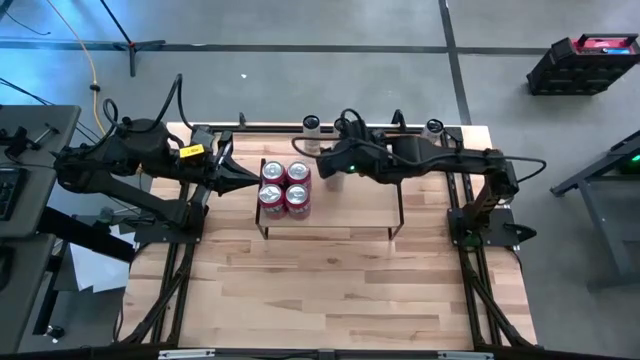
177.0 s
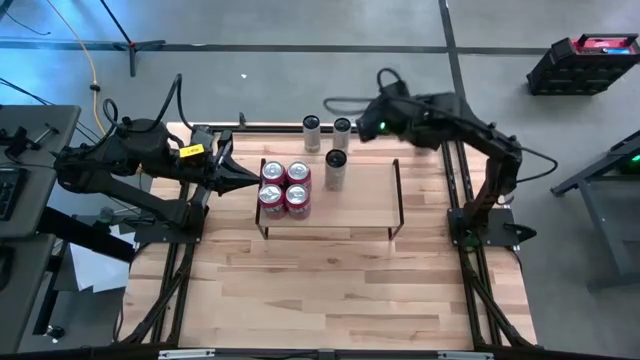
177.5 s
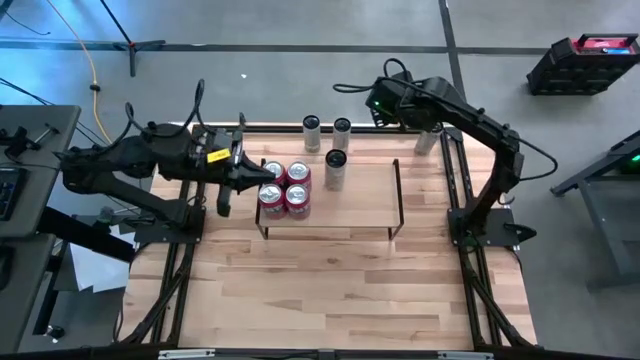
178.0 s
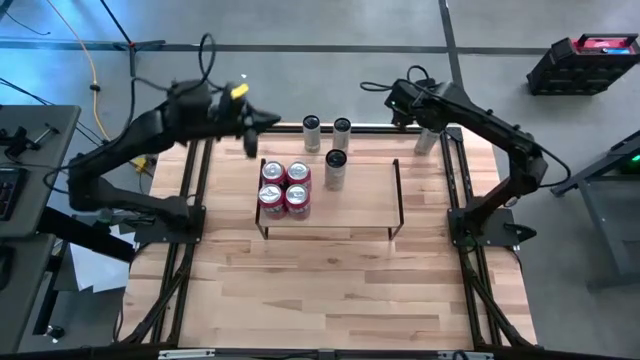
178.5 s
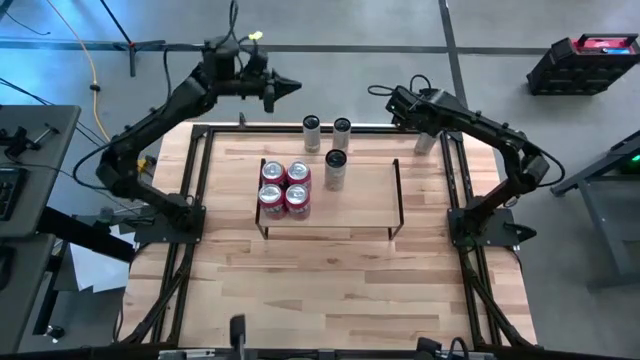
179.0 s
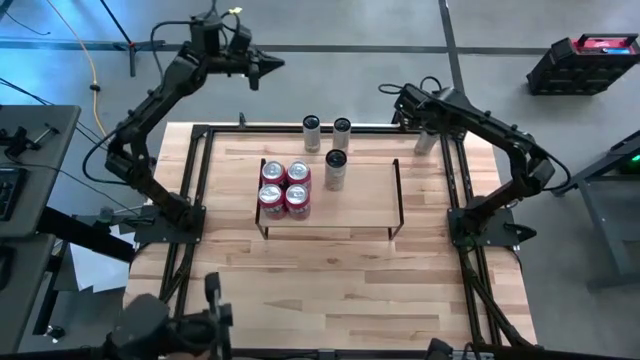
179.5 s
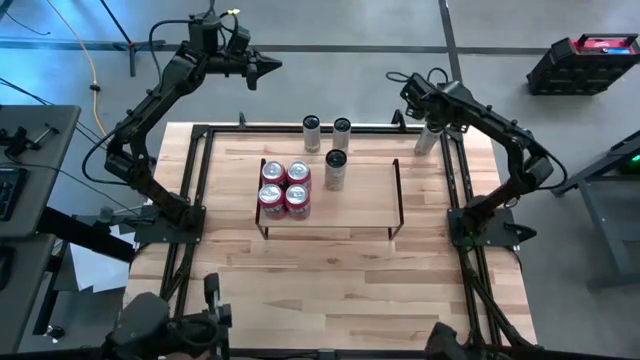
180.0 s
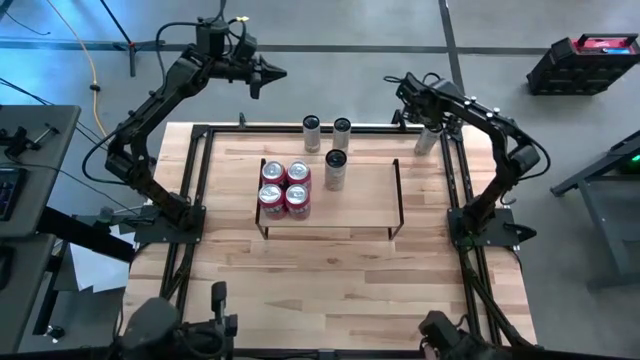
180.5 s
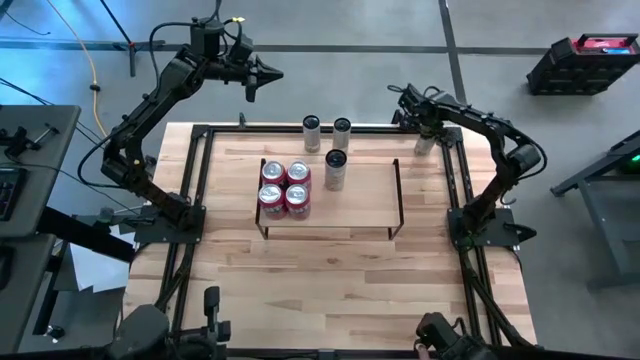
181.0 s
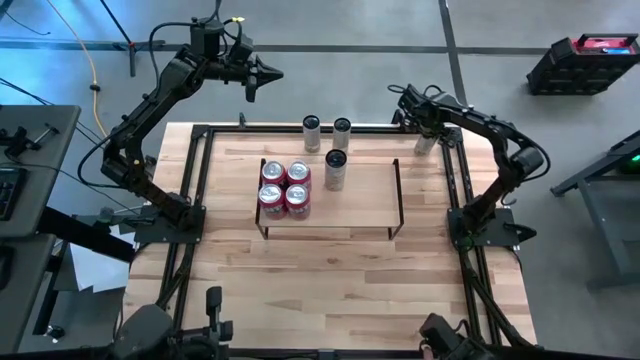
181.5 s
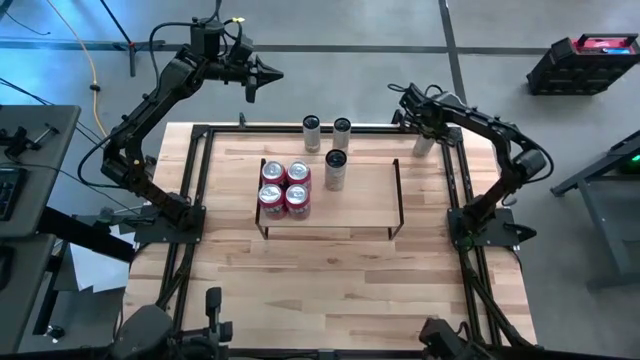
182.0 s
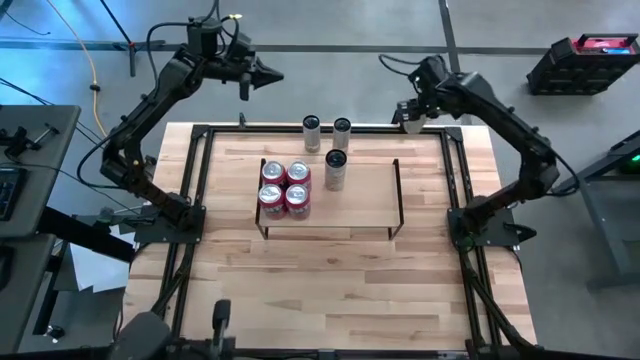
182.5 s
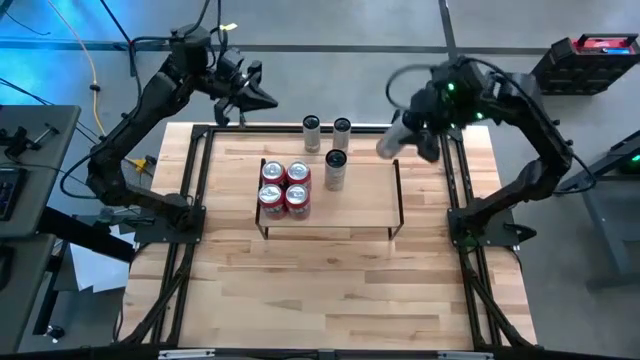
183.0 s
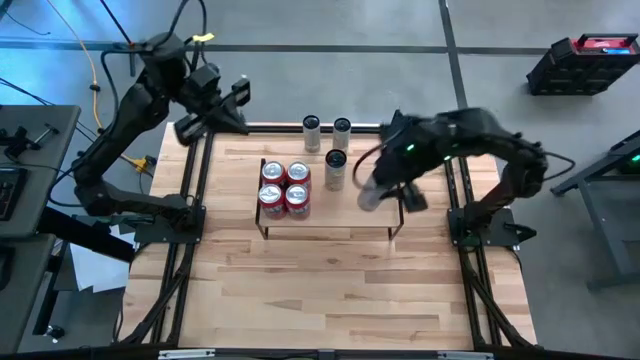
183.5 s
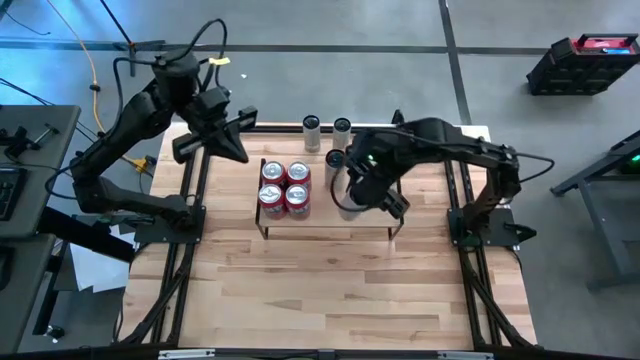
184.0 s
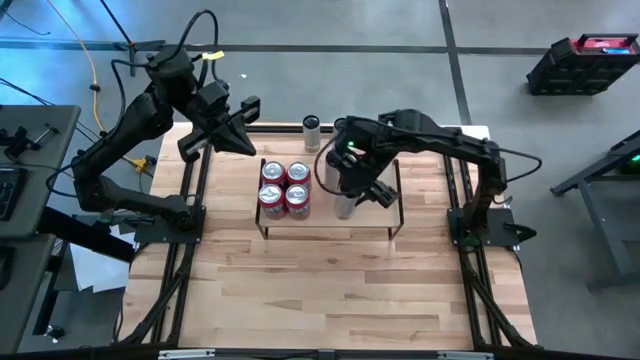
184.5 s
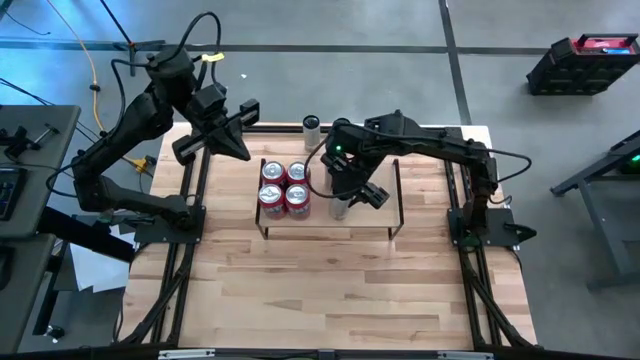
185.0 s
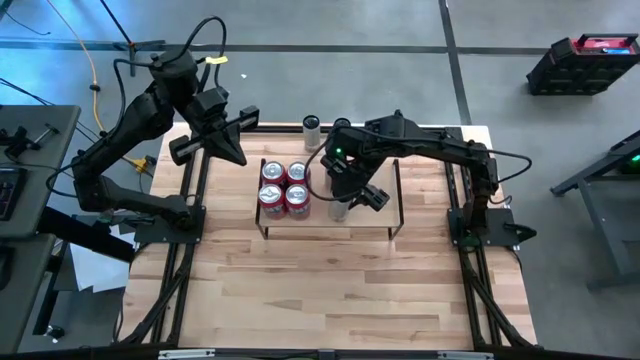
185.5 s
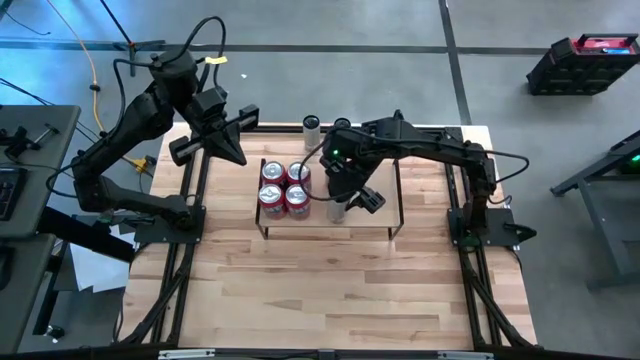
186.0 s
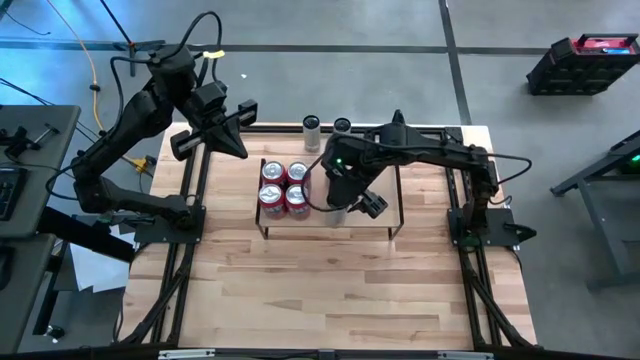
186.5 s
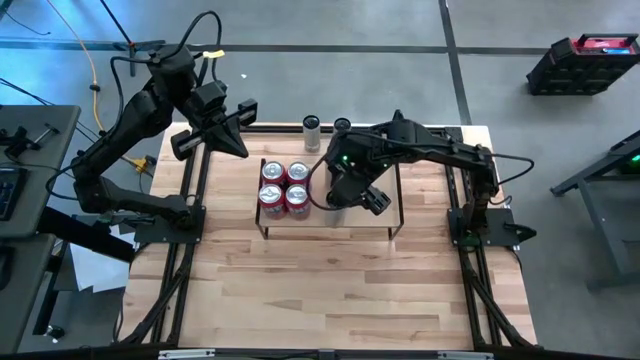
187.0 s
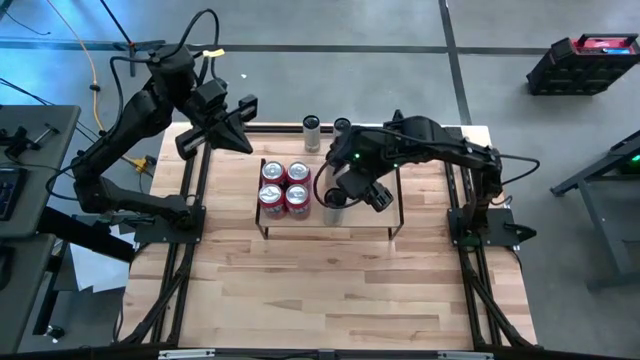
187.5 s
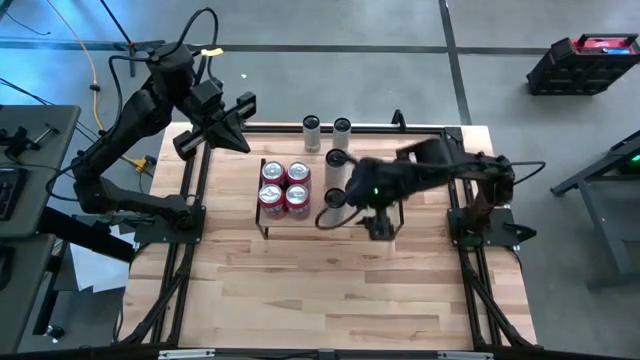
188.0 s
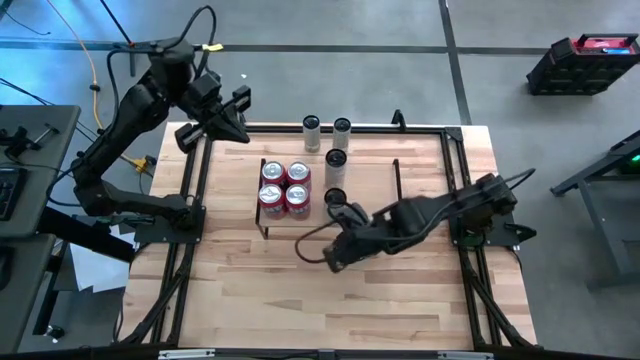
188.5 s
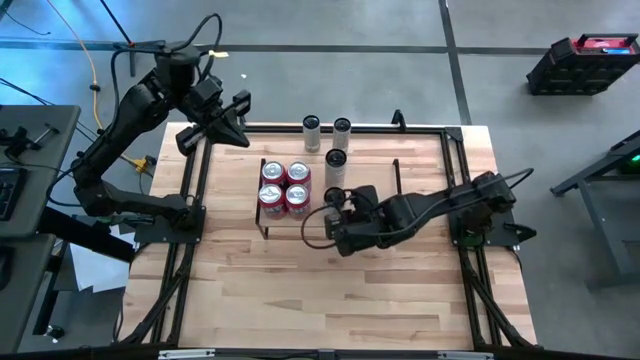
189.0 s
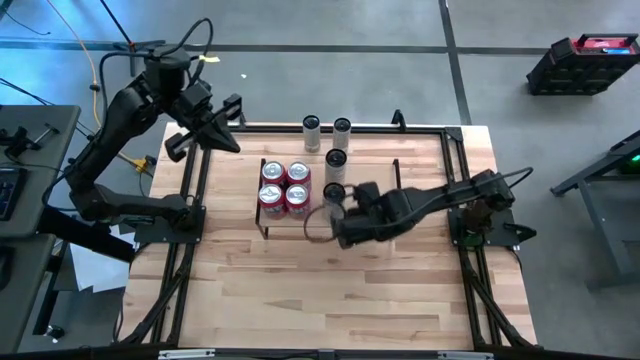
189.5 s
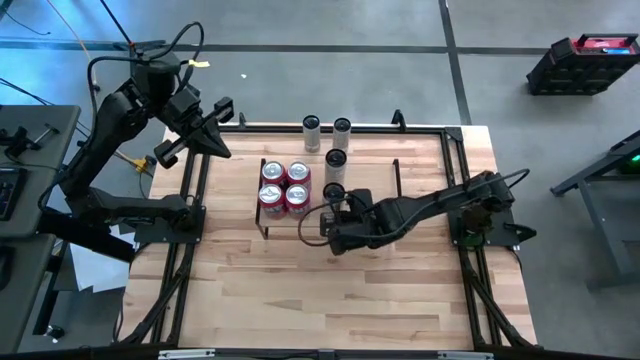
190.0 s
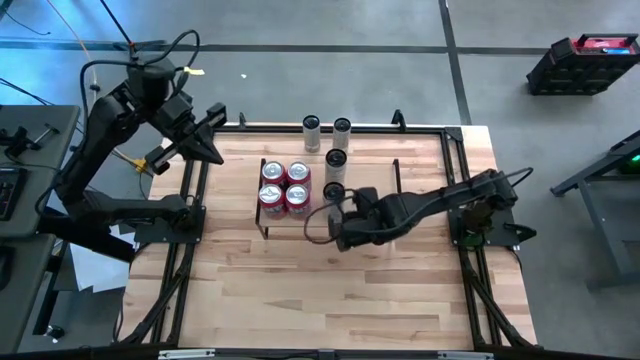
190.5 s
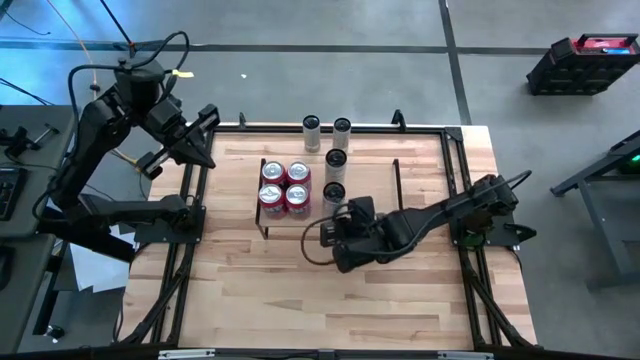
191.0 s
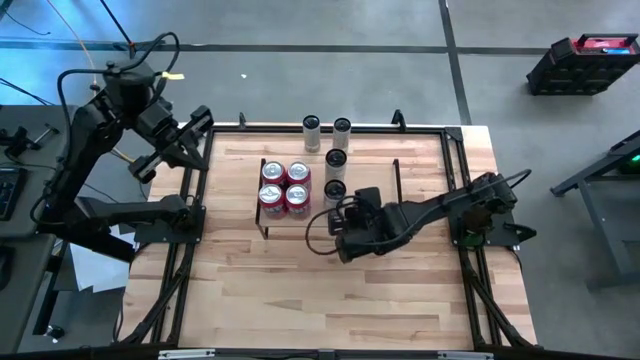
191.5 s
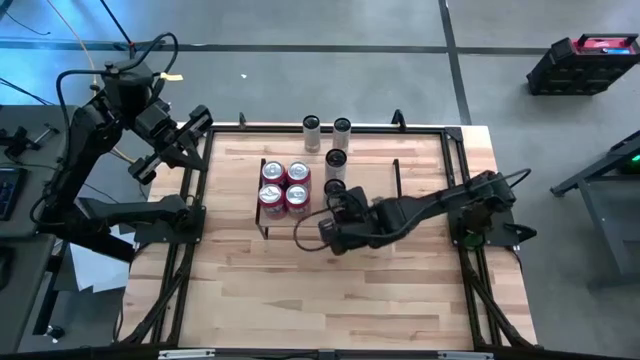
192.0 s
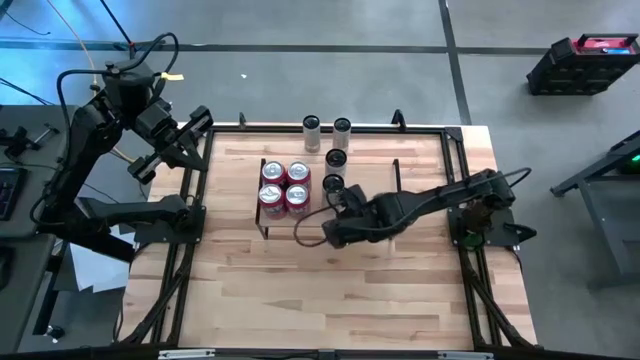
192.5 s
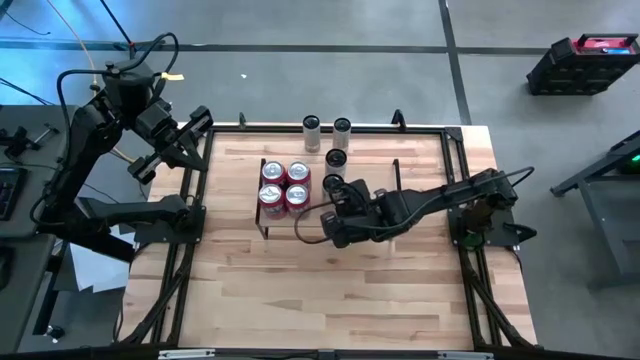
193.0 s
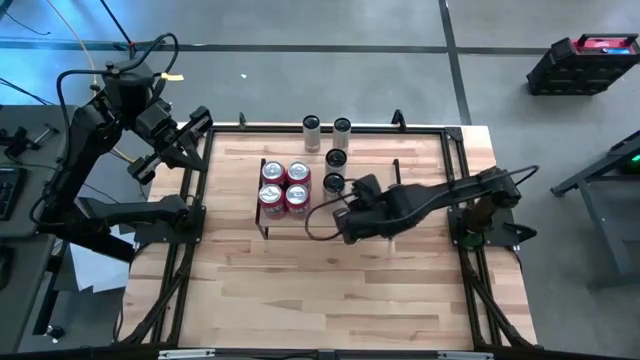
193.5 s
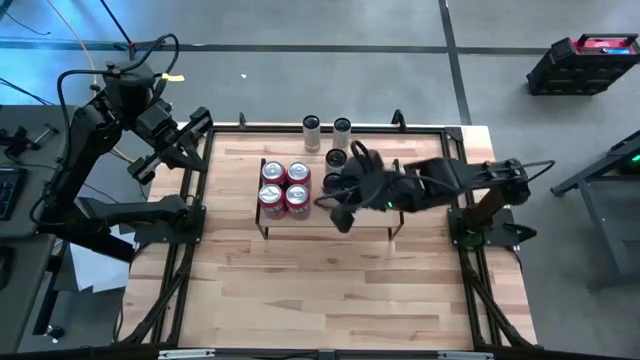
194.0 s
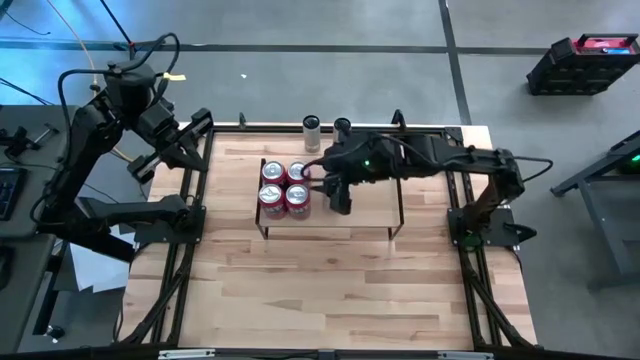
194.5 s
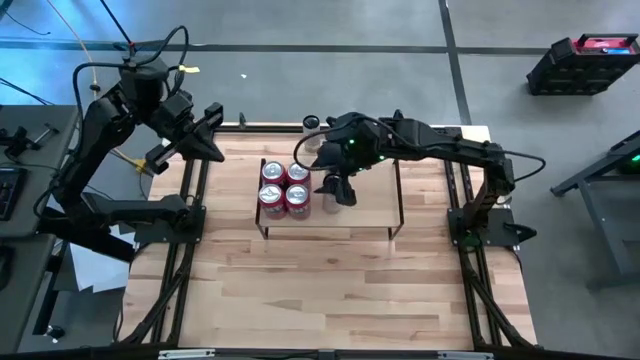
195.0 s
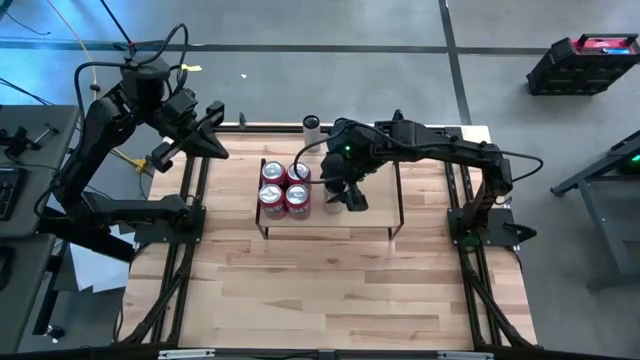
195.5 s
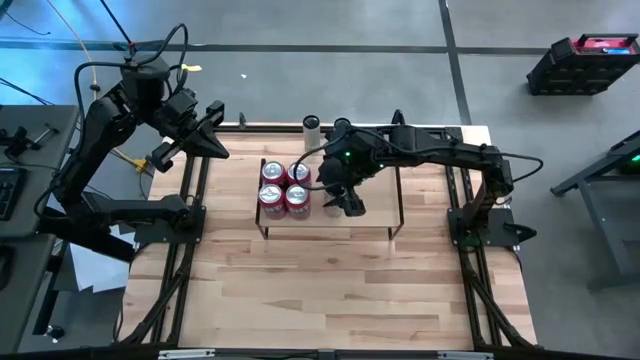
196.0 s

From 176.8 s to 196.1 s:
Task: Place canned beverage on shelf
Put the white yellow soda can on the shelf aligned with the other white yellow soda can

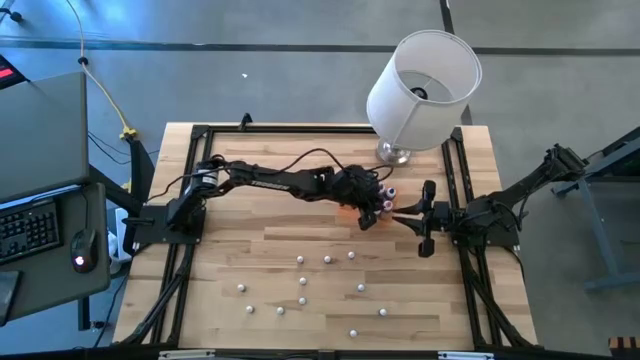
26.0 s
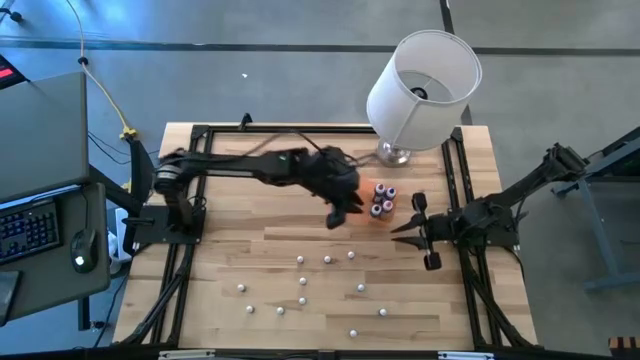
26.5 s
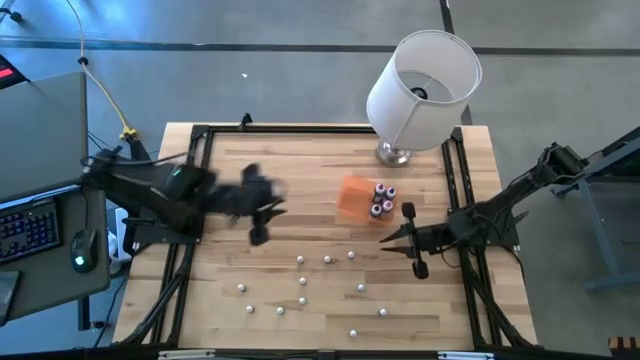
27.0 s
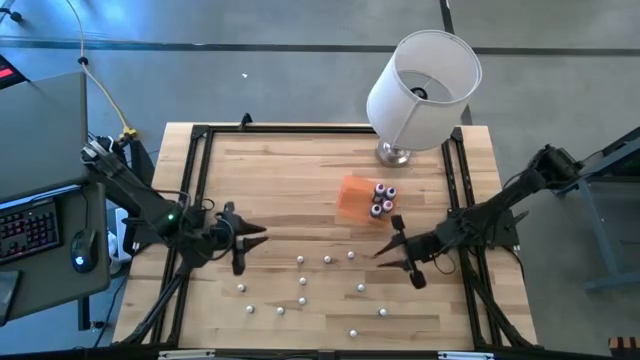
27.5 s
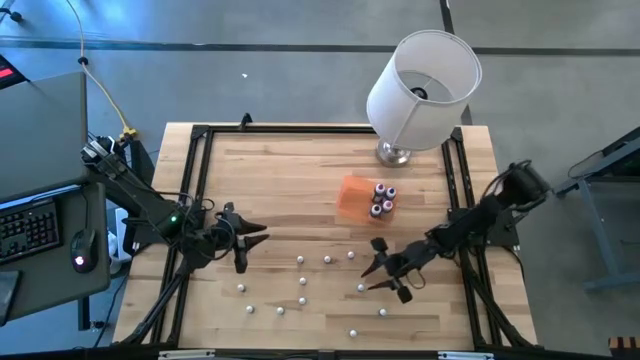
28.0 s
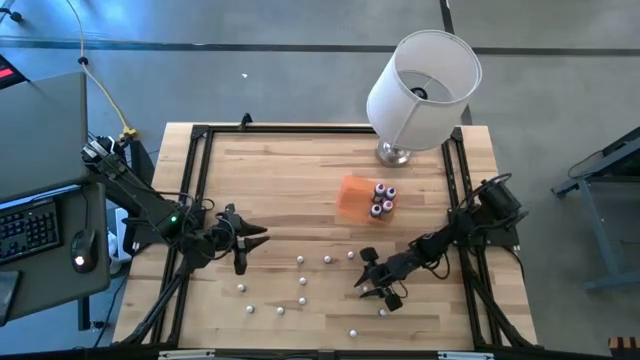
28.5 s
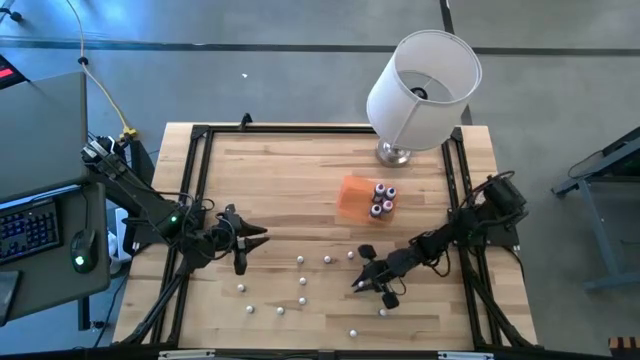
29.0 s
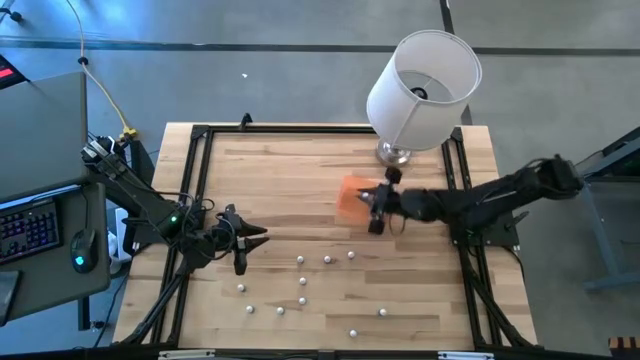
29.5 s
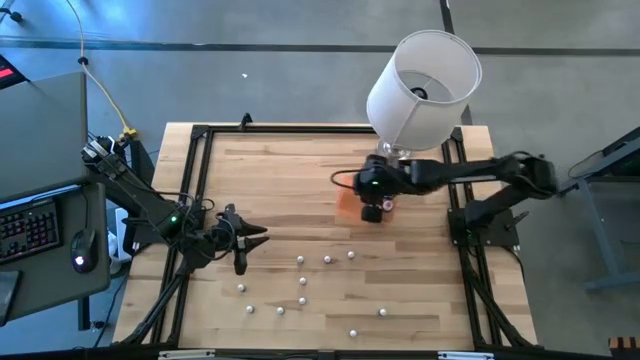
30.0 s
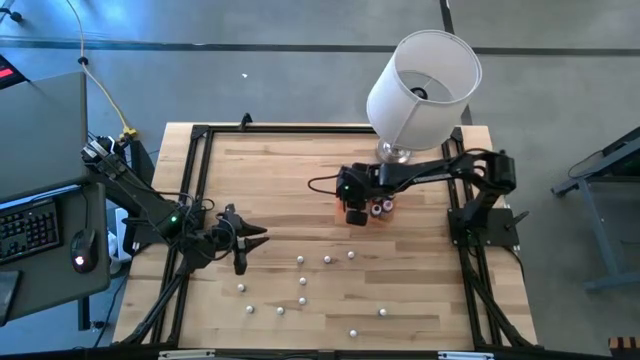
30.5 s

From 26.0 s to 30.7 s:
Task: Pick & Place food coloring
Put the small blue food coloring bottle into the orange container
